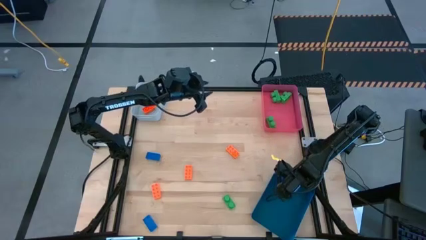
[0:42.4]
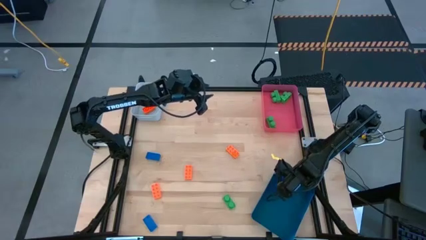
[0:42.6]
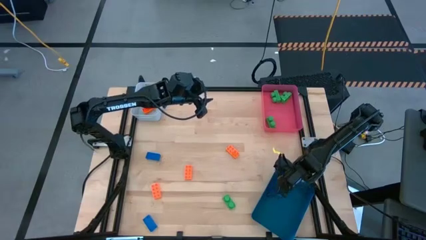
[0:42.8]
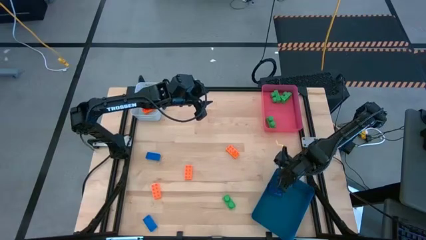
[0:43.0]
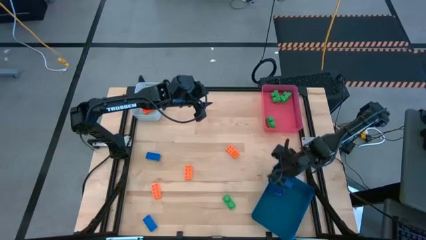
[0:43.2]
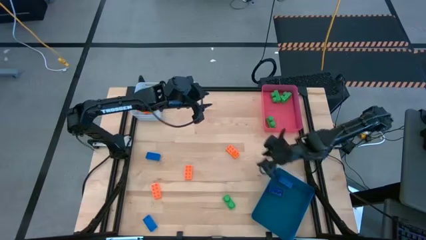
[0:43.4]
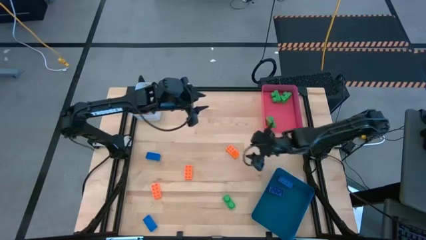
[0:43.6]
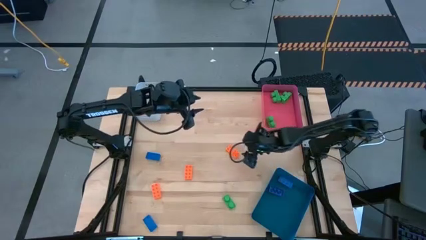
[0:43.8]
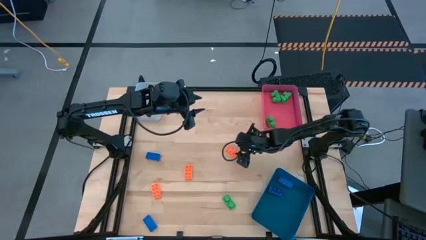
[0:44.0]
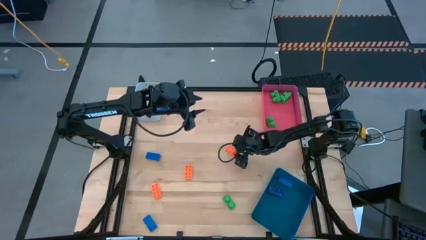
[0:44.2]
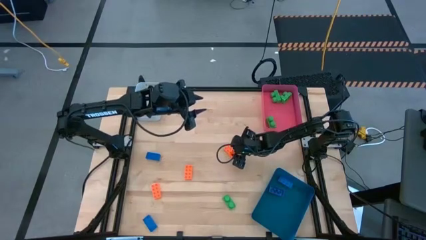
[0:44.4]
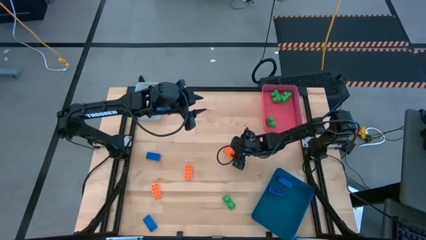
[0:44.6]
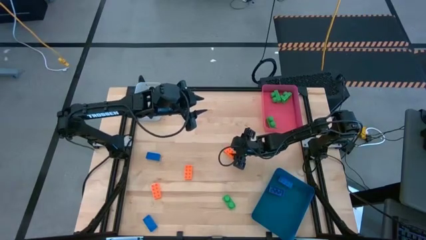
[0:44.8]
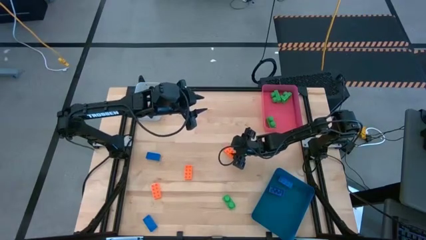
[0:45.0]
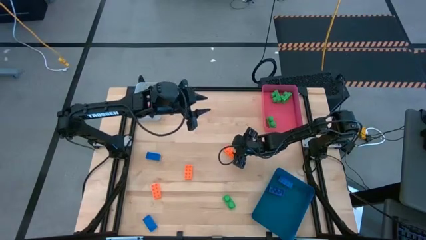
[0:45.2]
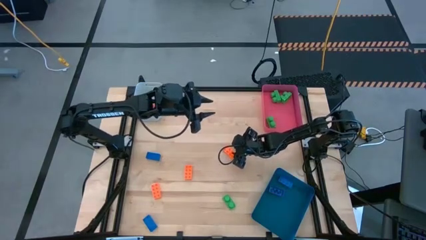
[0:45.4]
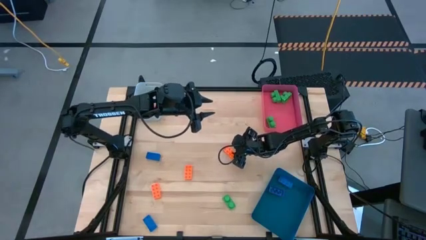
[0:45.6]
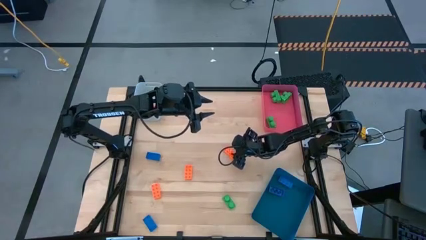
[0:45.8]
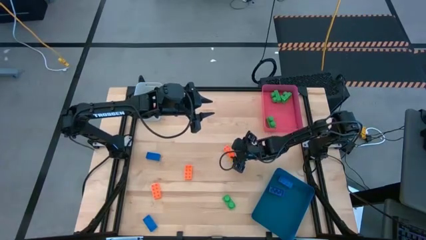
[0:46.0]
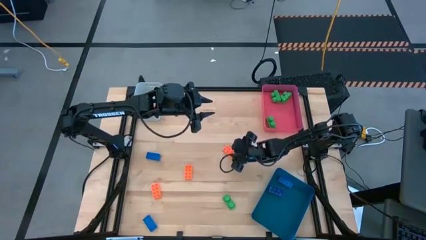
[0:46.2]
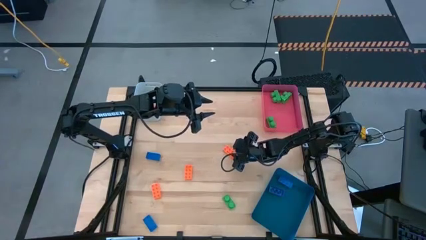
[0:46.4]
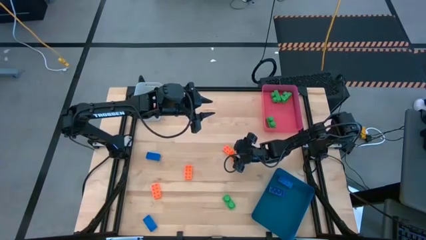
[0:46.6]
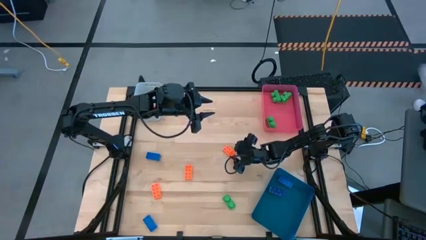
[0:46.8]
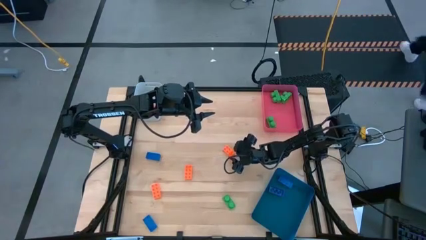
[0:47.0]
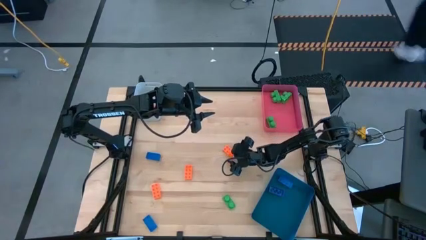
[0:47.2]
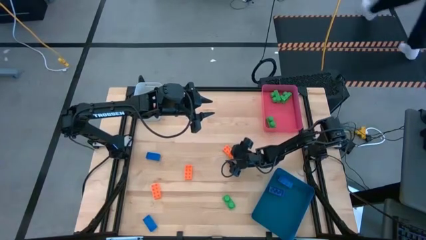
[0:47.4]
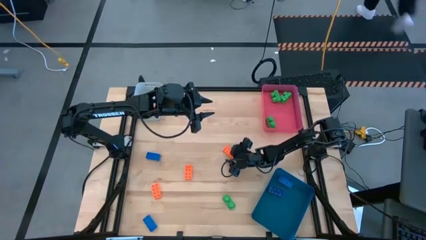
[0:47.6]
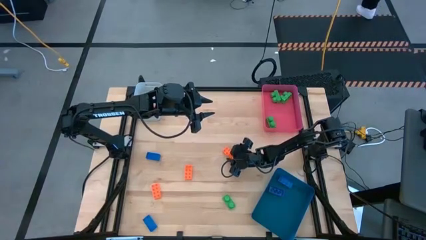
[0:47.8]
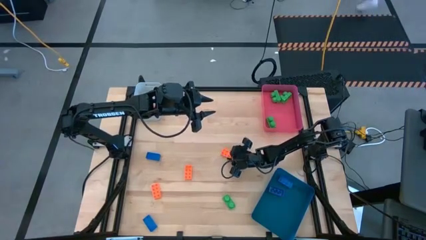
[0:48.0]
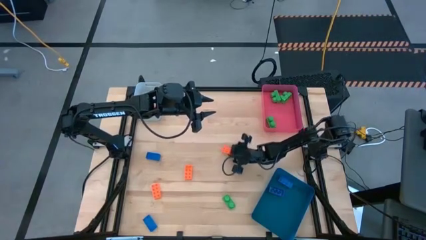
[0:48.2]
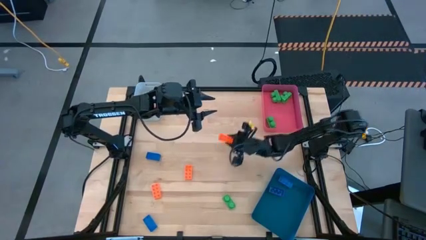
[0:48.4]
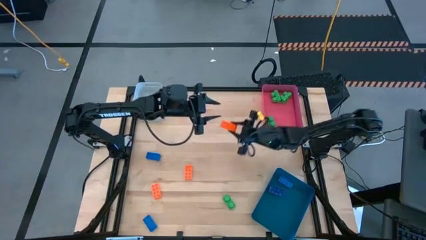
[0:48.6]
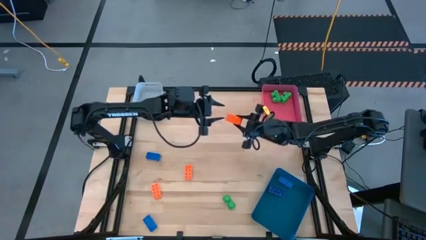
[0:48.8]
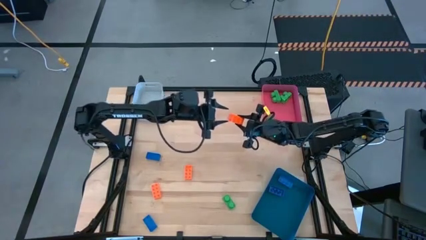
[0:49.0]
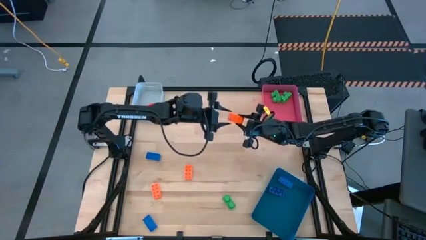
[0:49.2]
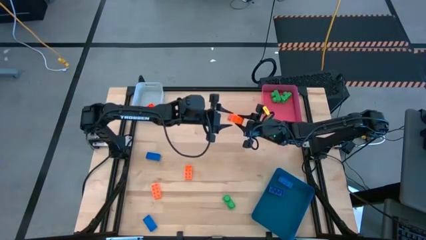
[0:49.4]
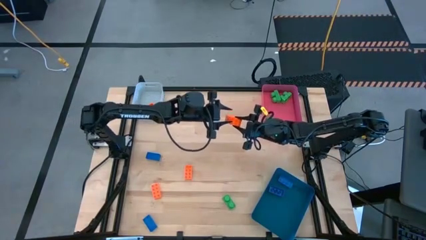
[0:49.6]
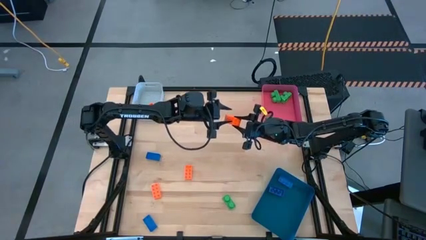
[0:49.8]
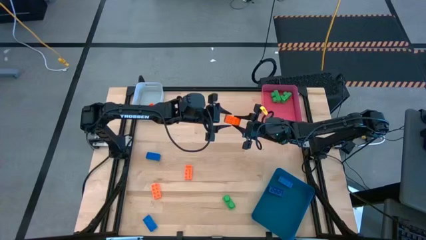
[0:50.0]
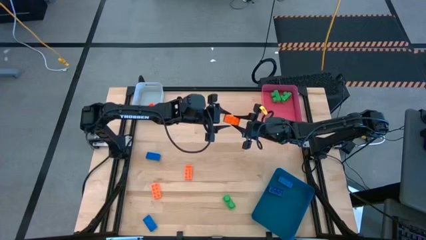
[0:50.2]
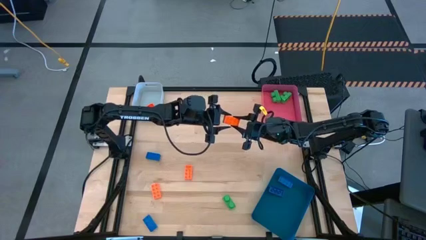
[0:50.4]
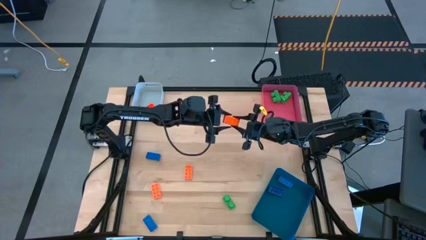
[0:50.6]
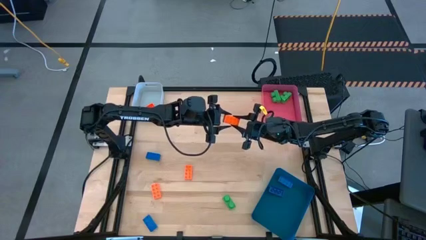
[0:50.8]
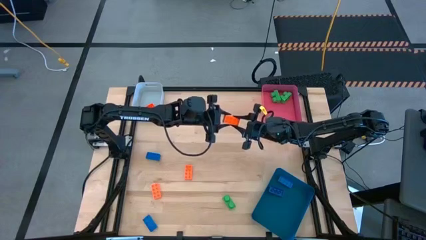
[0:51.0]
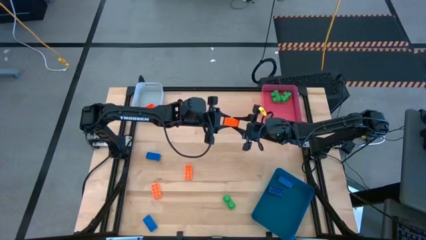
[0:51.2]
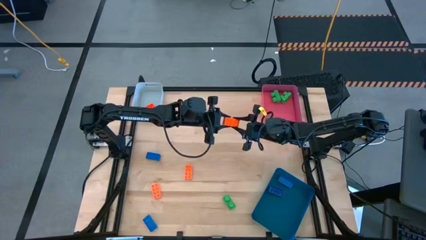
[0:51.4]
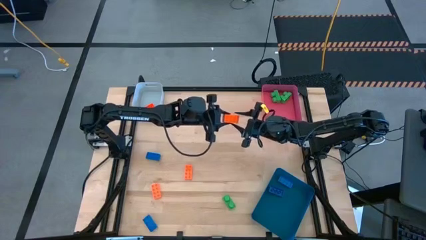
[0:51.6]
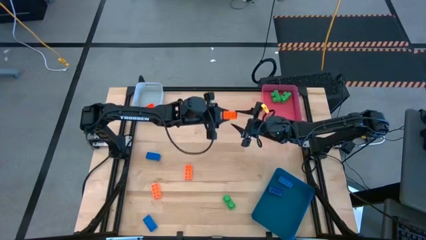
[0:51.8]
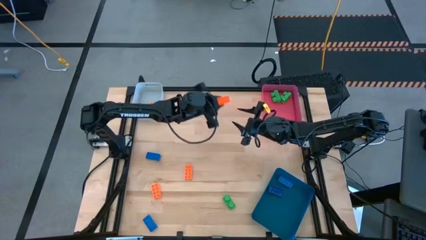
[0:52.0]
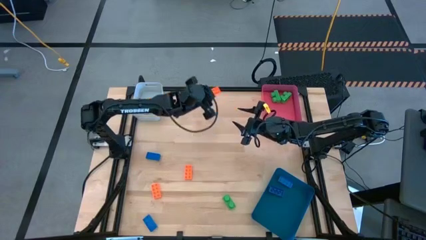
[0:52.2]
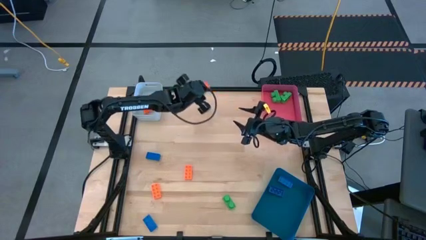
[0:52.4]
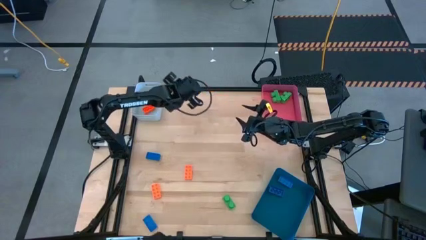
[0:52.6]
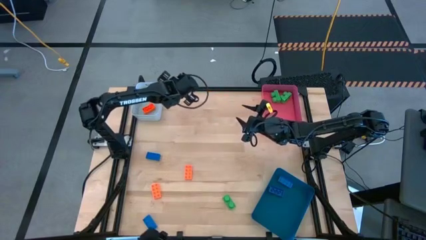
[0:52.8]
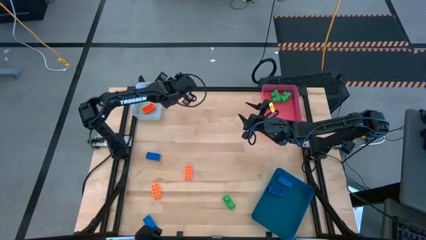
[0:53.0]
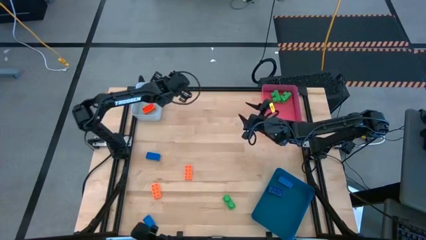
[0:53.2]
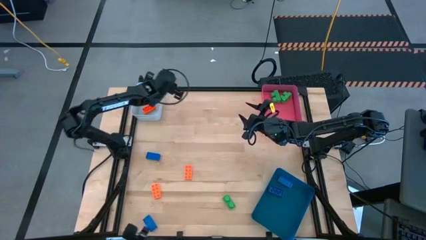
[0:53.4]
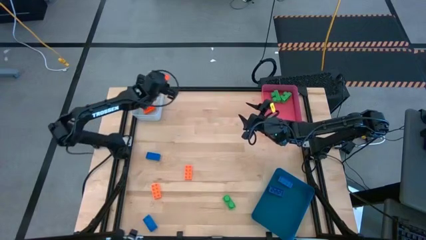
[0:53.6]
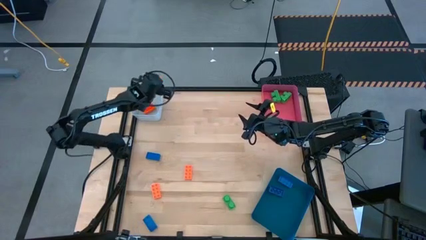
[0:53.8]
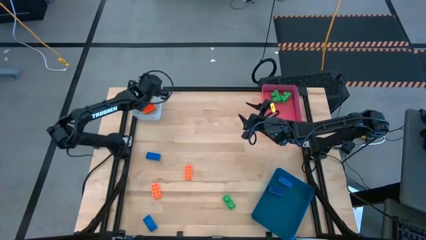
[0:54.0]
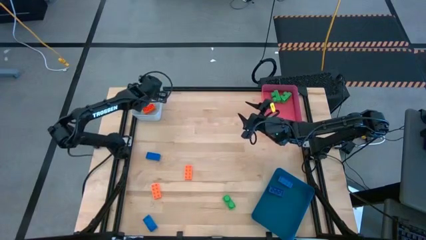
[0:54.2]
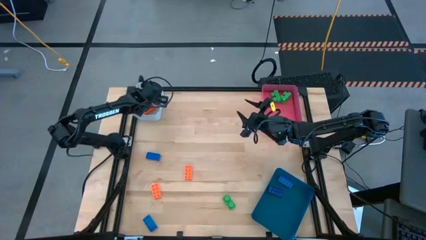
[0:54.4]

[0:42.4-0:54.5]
Task: Sort & place blocks by color
Put the orange gamepiece into the gray bin

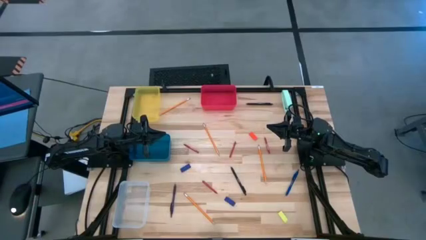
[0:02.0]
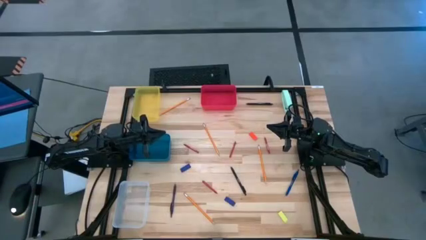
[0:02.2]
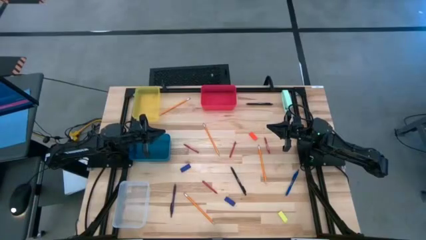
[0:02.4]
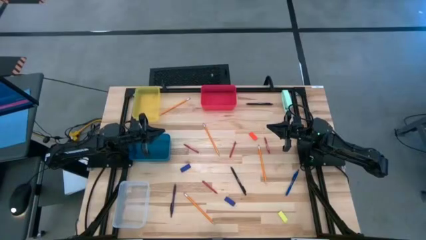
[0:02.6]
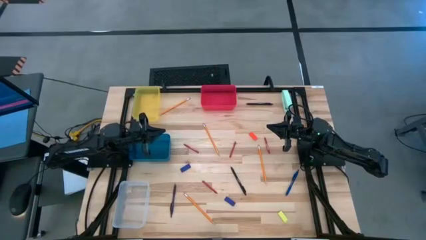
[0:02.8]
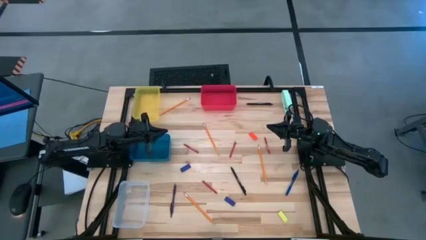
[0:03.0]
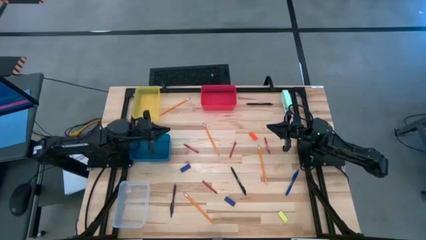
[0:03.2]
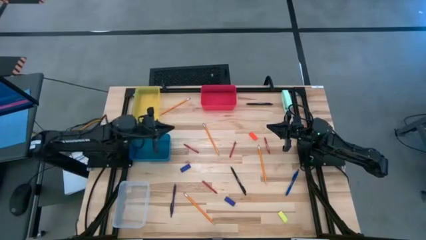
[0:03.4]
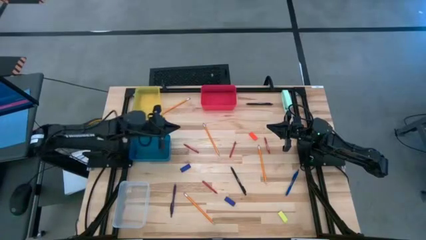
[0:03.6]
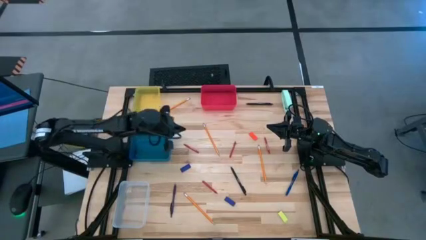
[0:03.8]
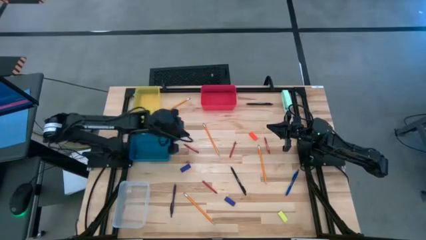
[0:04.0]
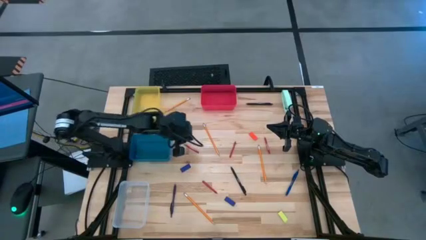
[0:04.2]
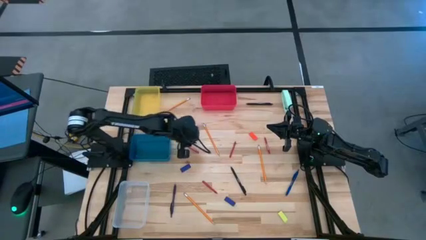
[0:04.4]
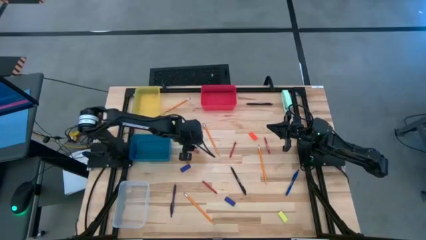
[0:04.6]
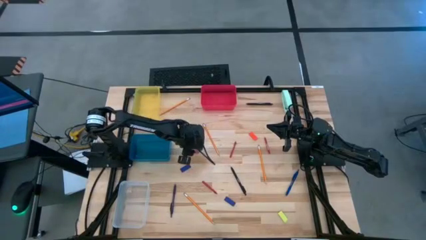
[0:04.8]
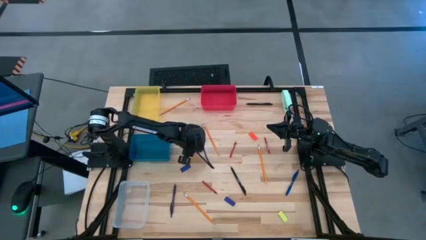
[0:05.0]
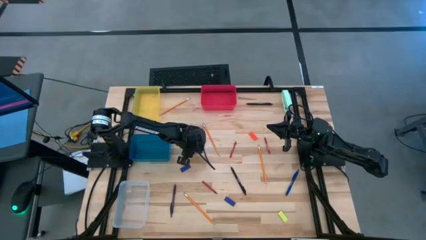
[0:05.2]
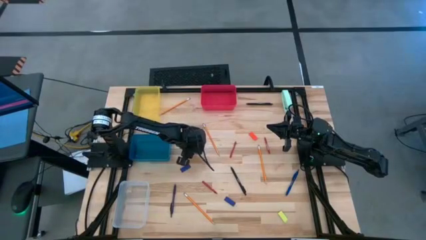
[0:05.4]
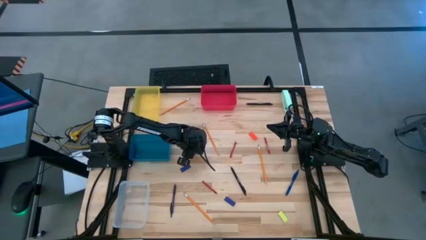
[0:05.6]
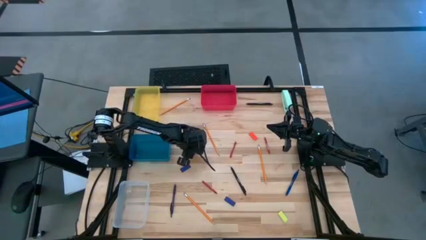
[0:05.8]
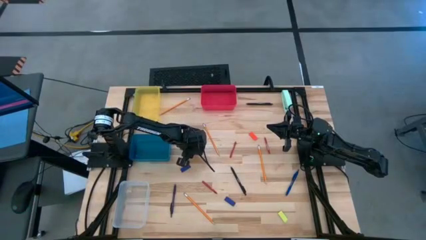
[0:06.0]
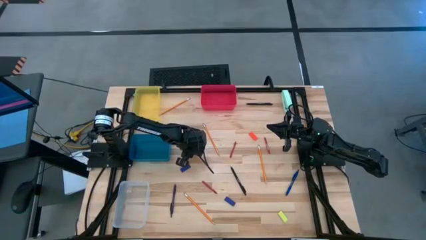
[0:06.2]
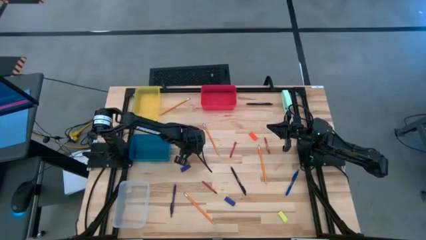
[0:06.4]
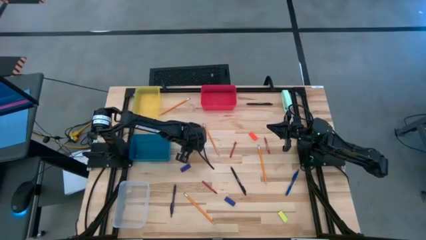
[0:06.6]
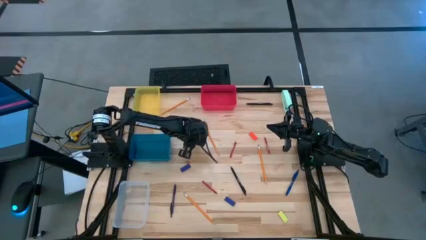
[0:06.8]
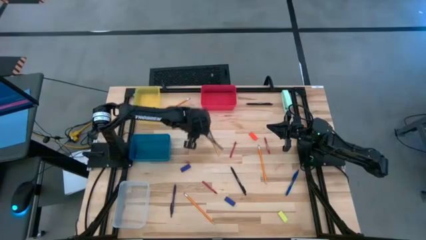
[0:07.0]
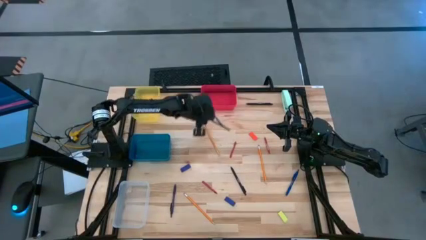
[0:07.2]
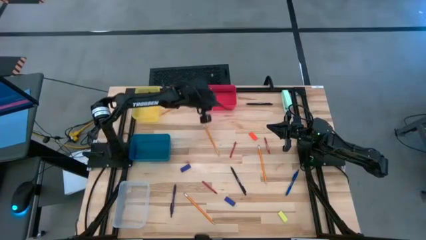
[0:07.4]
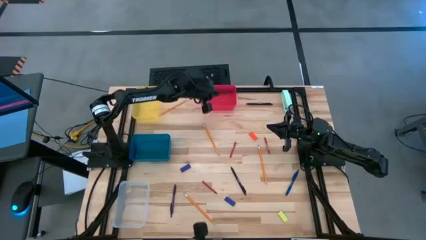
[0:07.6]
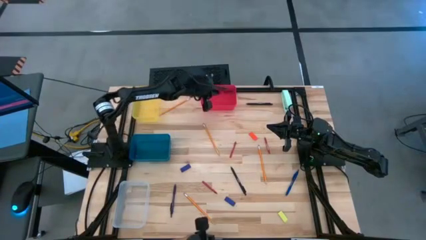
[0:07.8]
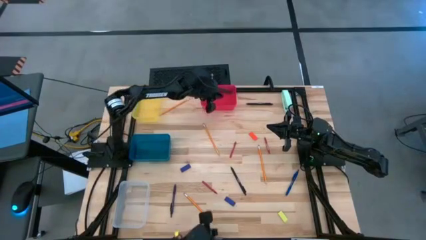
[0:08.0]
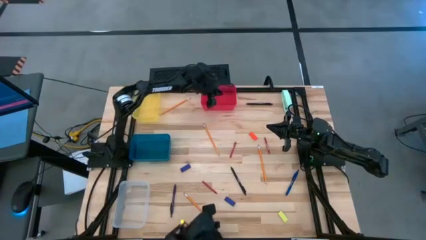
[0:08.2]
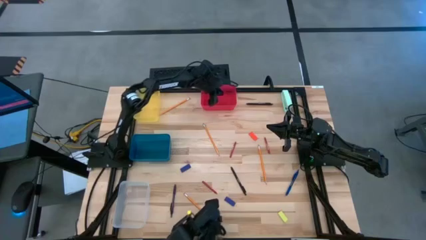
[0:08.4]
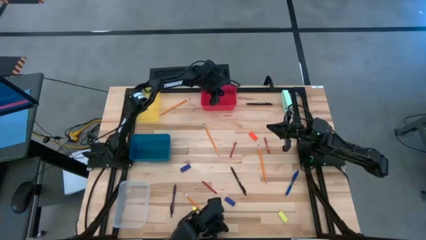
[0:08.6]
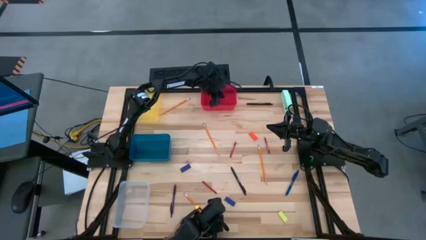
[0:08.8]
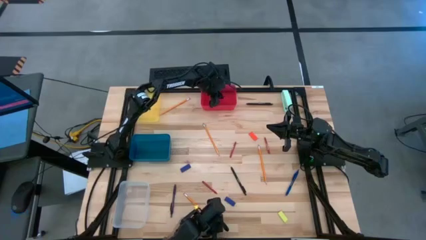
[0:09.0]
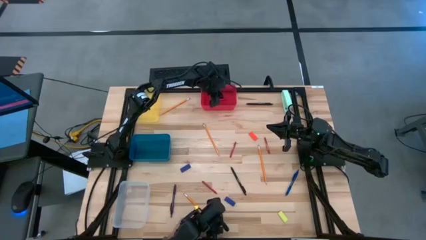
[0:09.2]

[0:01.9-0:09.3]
Task: Sort crayons/erasers/pens/pencils in bins
Put the red crayon into the red bin
